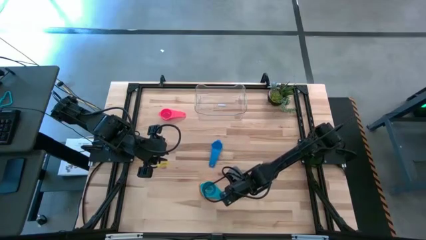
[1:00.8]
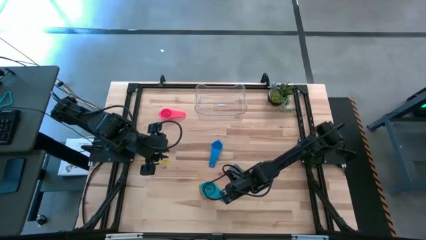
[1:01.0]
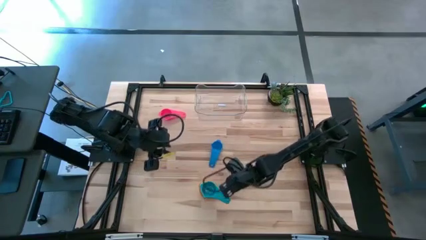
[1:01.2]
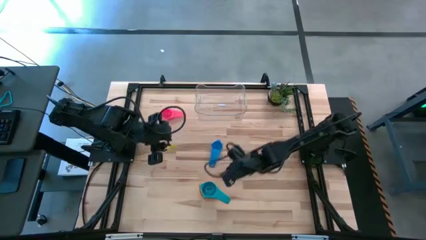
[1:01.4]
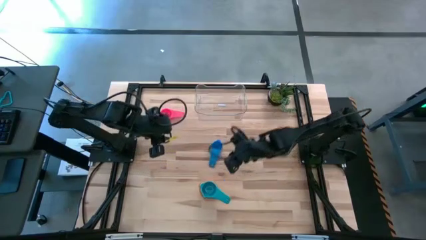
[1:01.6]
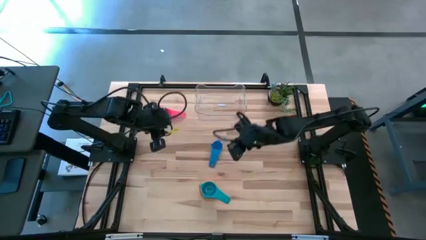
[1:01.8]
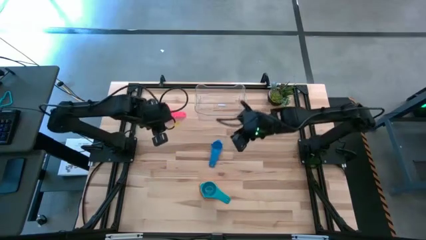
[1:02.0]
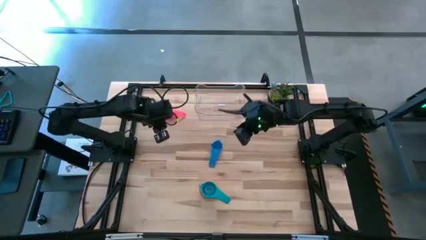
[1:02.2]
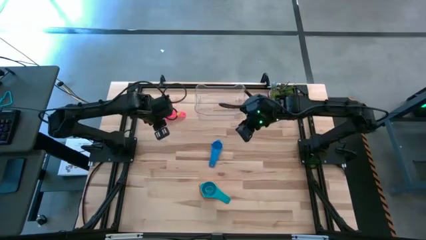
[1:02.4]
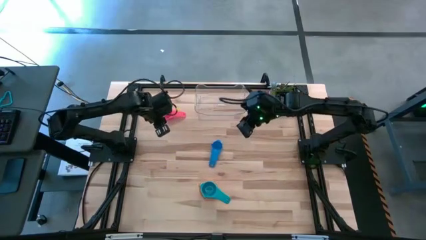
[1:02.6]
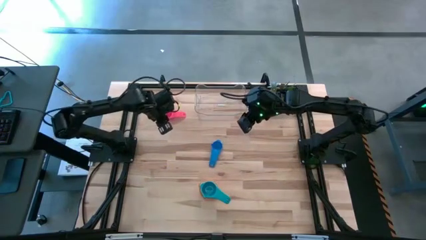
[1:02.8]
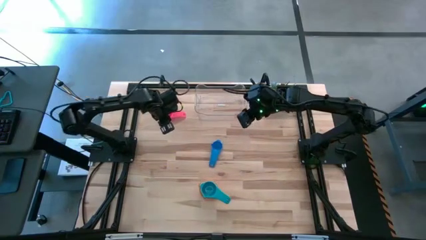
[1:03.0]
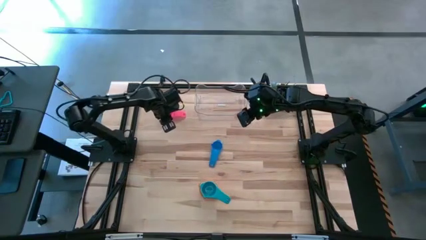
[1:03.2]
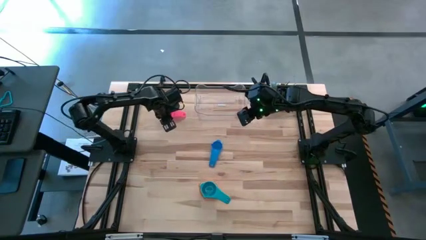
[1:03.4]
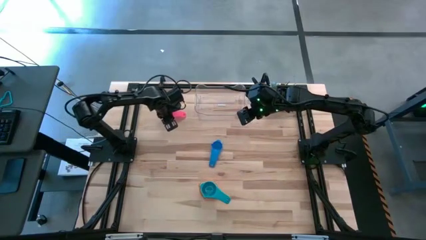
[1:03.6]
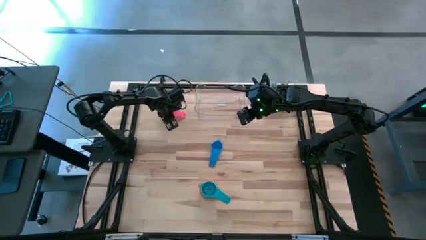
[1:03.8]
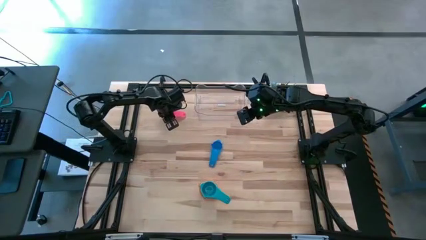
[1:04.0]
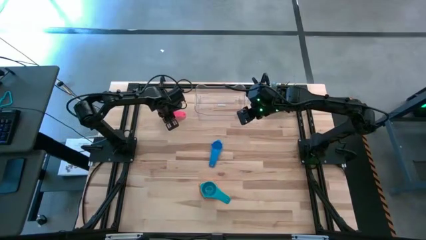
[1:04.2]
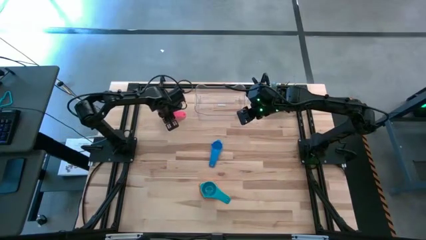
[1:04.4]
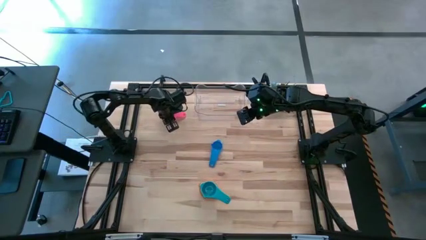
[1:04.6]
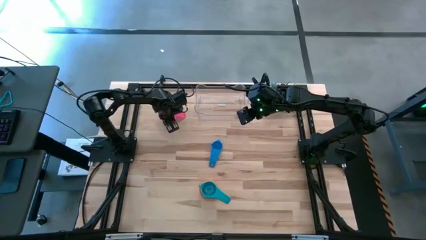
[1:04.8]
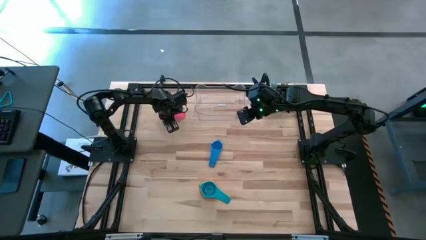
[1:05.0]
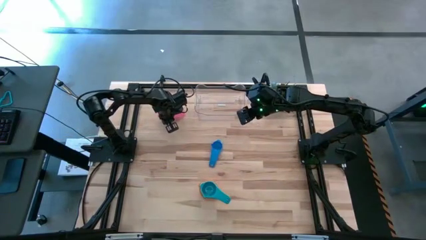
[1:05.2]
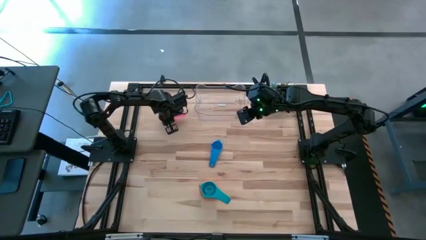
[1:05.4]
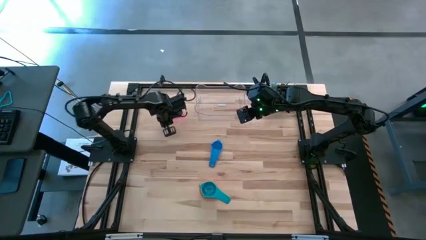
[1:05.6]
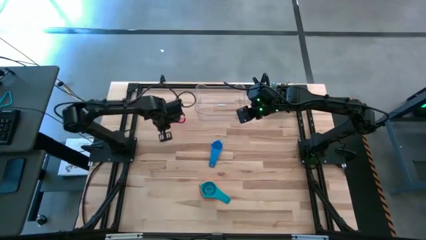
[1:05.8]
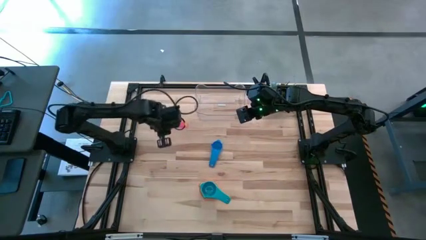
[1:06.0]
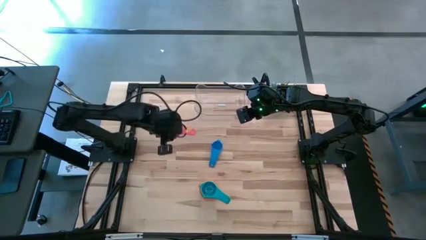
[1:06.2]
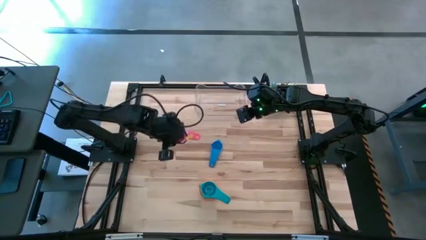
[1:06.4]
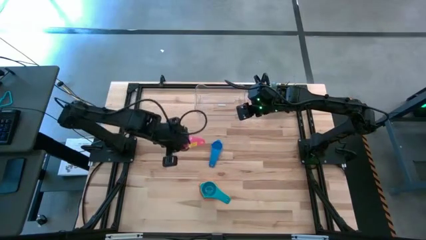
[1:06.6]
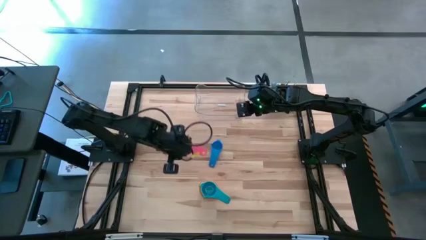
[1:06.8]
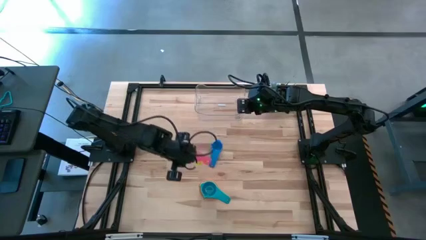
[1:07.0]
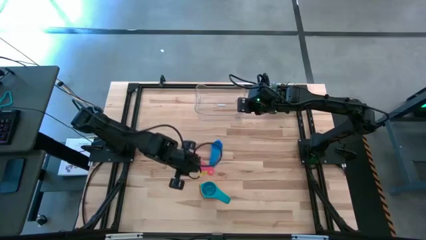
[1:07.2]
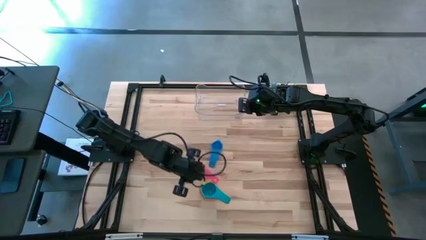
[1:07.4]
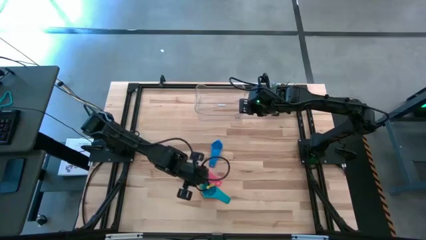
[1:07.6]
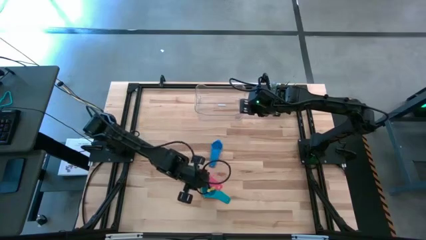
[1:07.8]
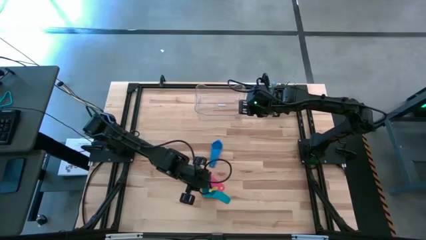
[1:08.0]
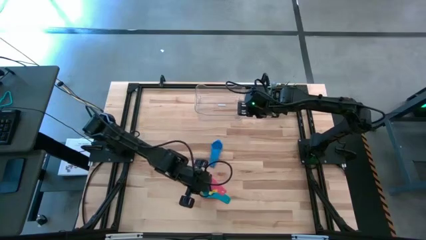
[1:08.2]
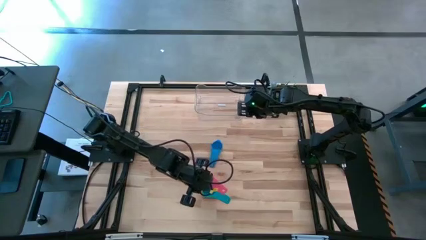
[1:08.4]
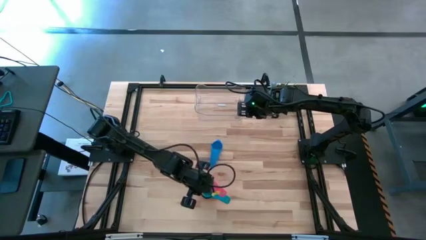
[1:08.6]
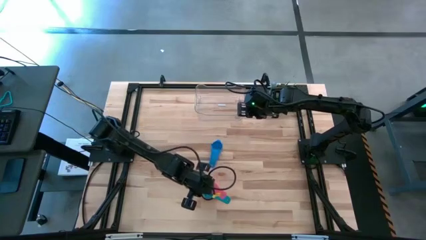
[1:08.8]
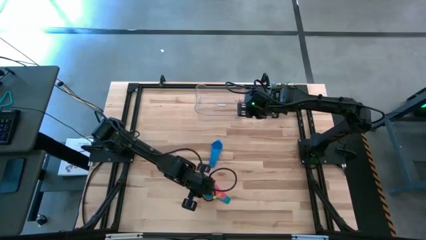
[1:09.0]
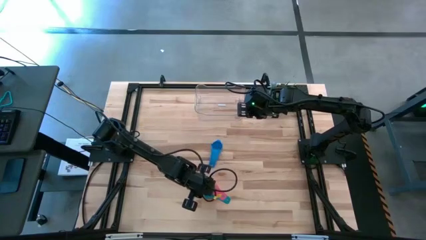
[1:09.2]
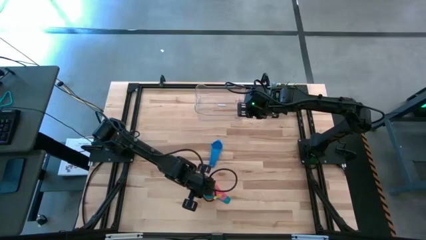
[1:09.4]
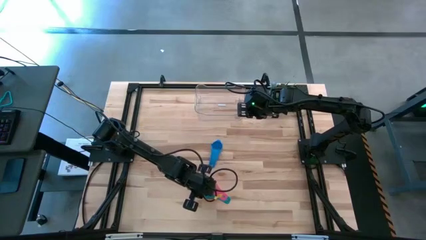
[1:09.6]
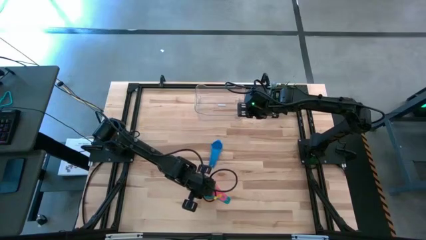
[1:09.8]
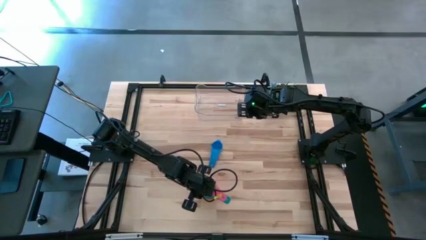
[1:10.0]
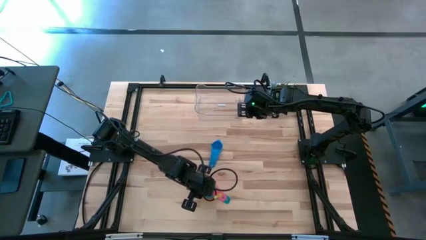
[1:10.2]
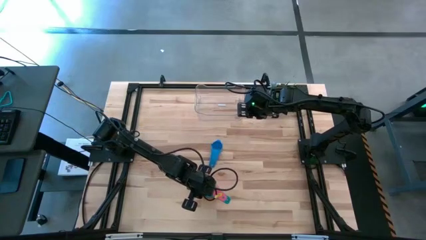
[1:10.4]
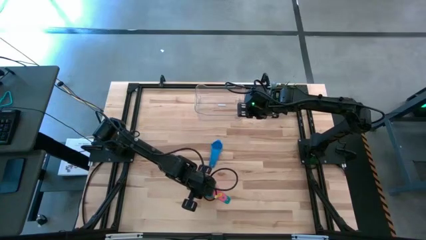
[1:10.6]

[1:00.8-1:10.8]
Task: Nest measuring cups in basket
Stack the red measuring cup in the light blue measuring cup

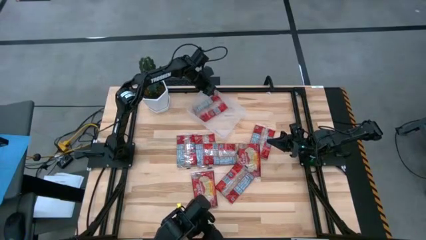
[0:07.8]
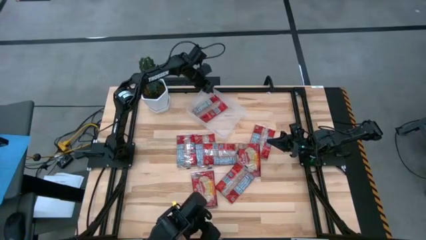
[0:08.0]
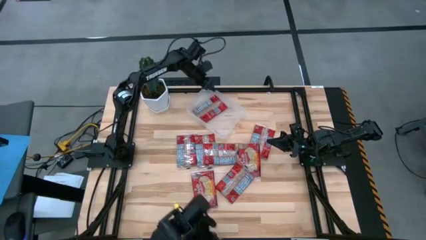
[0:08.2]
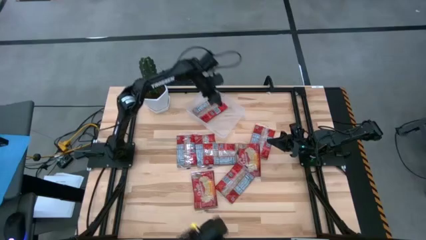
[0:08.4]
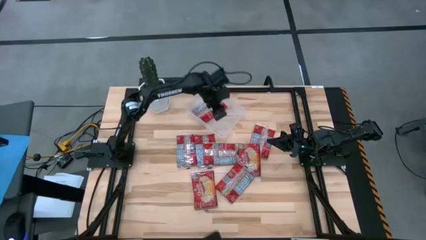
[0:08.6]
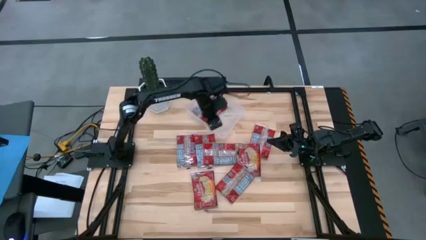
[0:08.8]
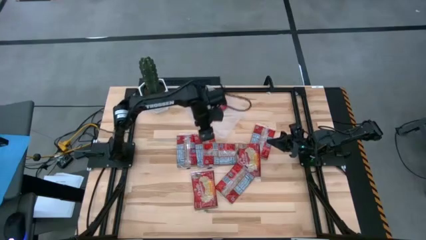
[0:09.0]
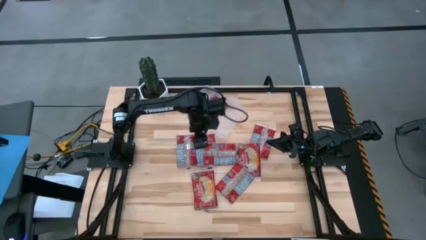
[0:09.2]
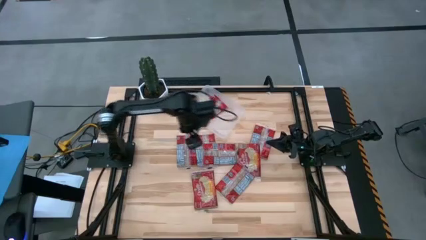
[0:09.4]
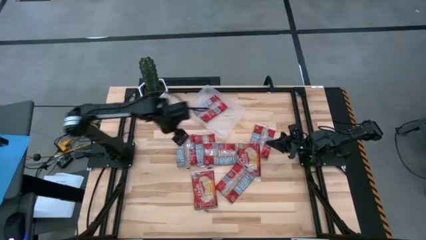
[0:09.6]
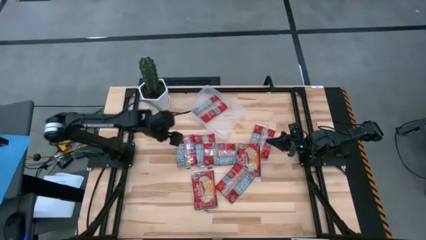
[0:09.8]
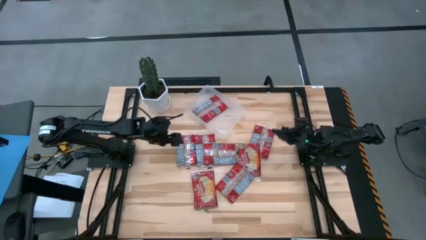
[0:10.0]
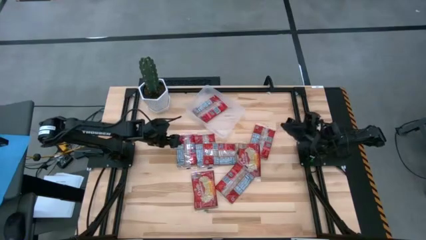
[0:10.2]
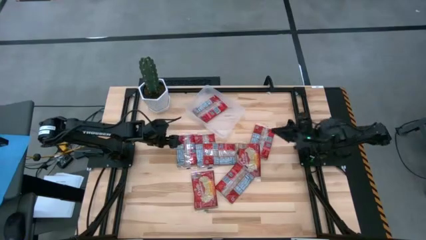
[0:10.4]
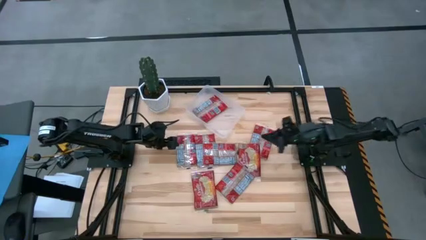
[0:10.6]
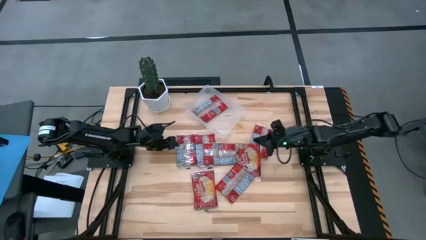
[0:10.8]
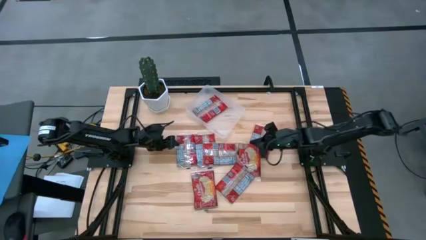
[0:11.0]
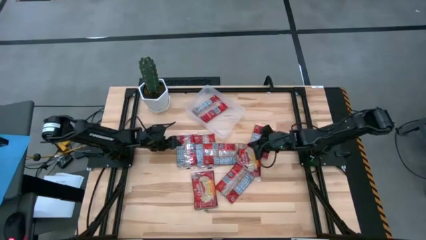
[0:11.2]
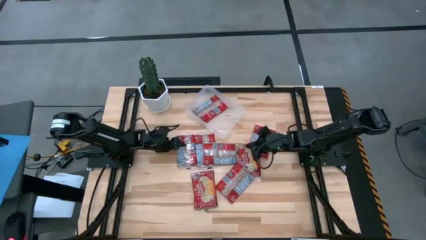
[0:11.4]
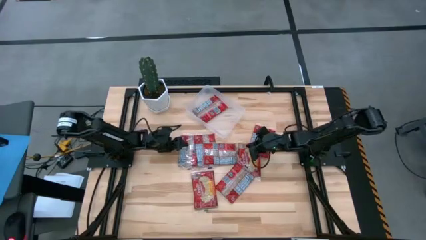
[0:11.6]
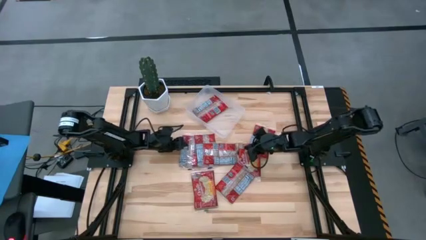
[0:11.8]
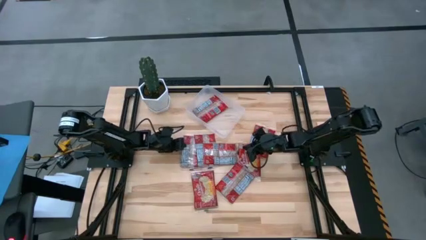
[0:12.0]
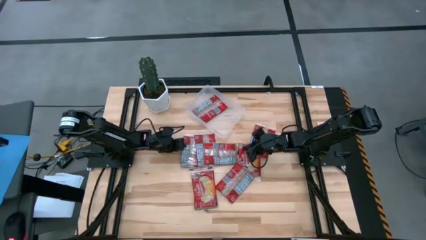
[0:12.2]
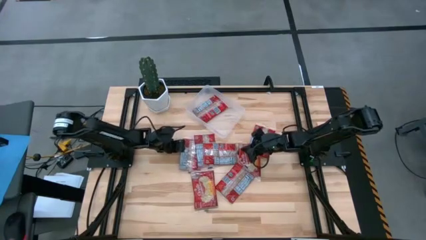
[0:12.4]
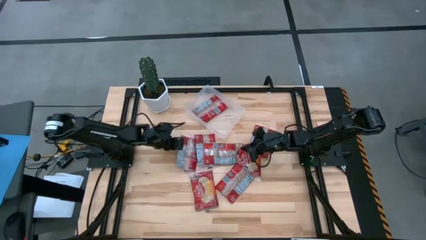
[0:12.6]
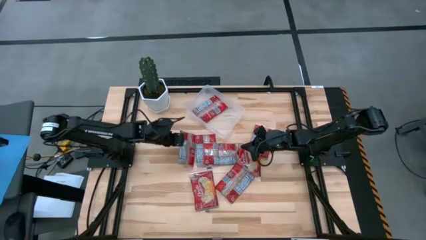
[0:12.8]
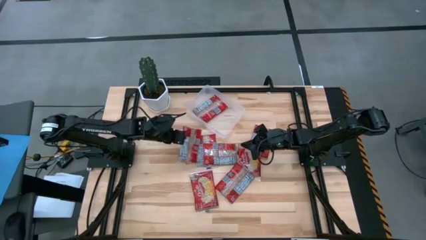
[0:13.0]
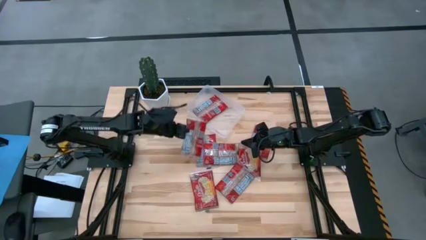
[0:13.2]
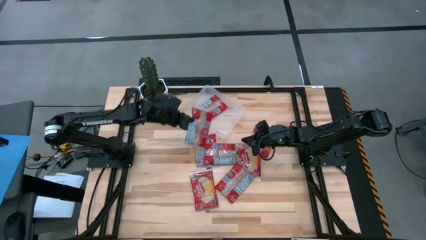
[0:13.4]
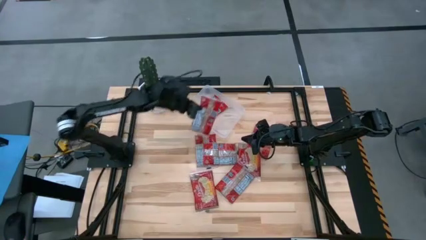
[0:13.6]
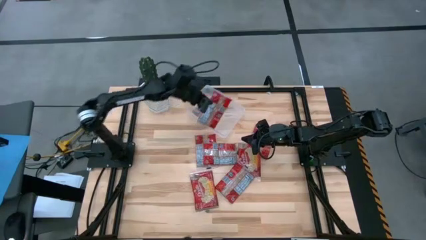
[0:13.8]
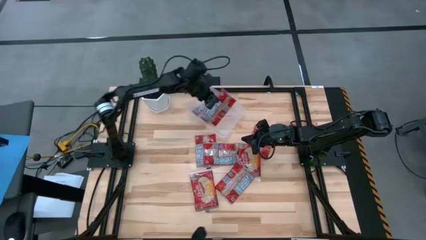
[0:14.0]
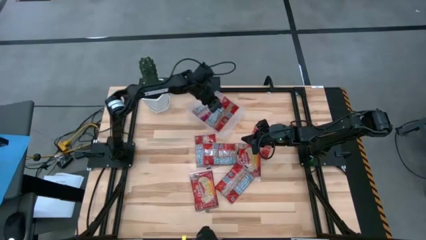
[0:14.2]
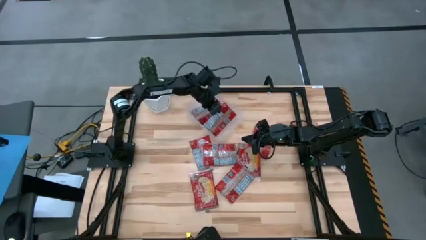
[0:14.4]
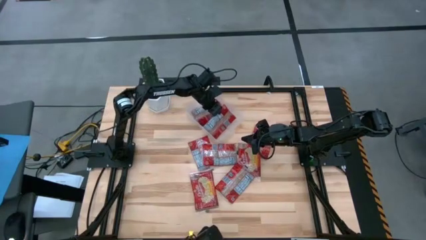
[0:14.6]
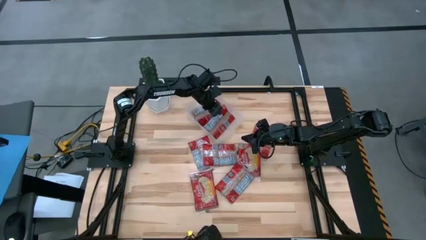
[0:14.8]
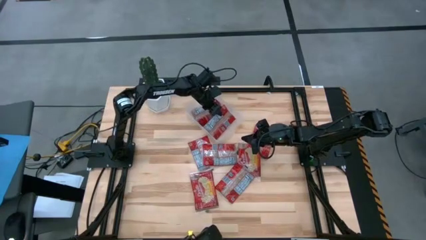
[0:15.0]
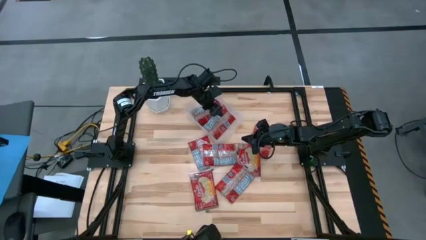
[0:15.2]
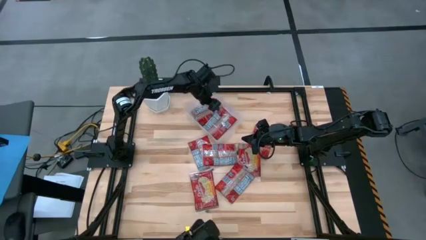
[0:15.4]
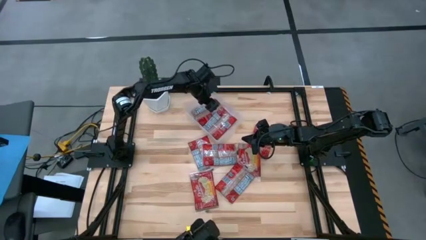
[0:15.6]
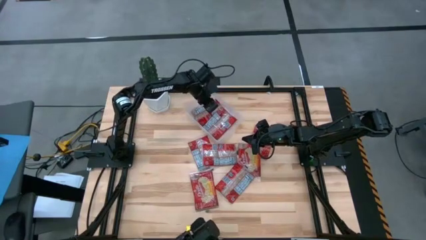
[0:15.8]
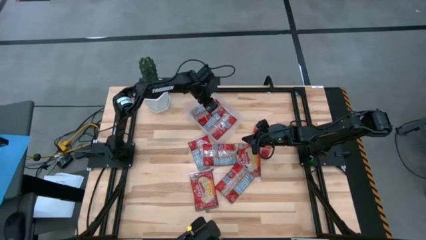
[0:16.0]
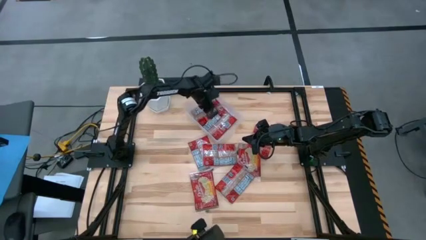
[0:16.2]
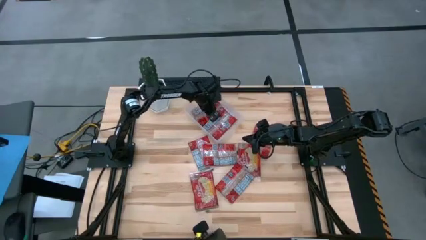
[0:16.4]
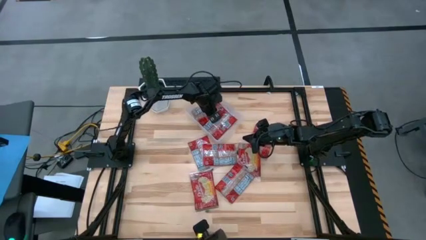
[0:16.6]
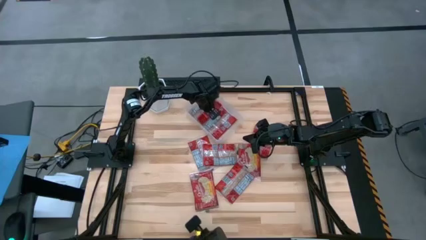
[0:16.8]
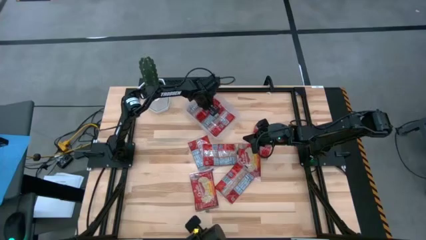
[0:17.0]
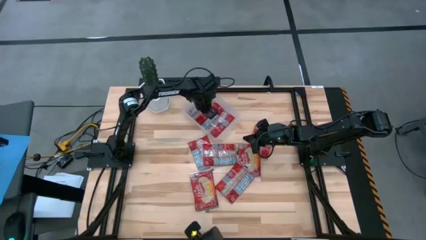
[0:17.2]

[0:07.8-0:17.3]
Task: Sort popcorn bags into baskets
Put the red popcorn bag into the transparent bin
